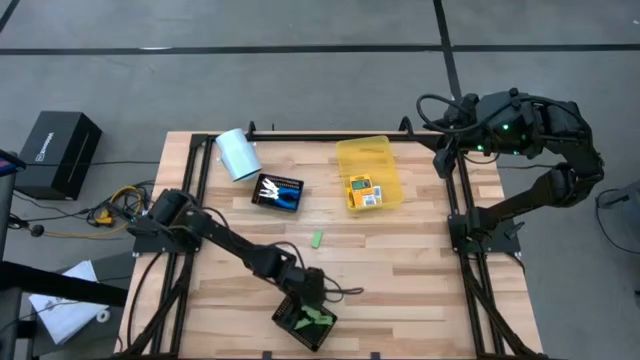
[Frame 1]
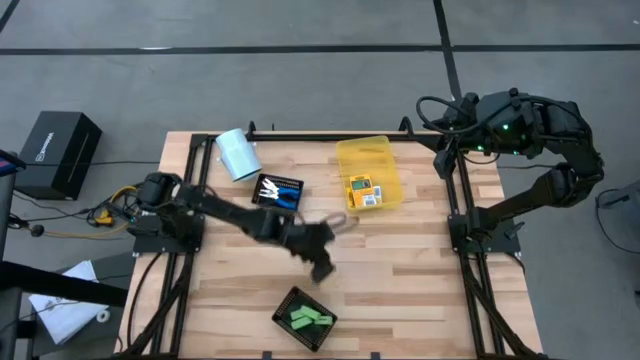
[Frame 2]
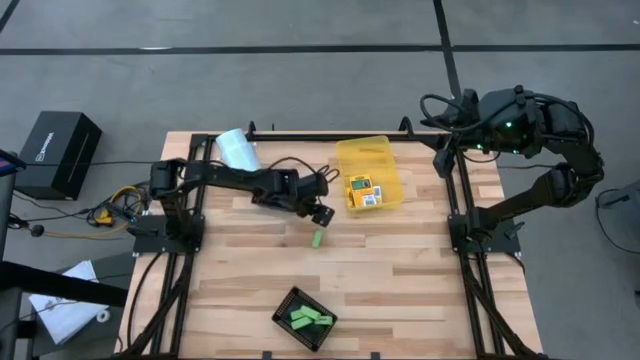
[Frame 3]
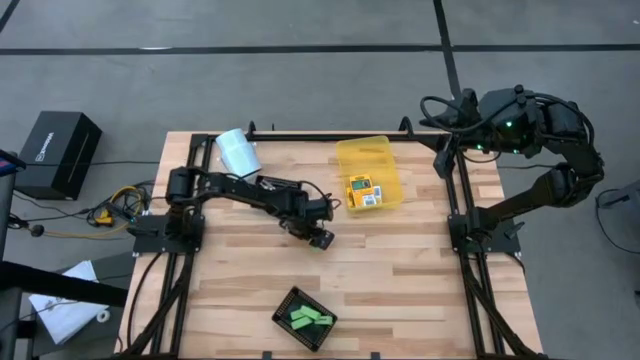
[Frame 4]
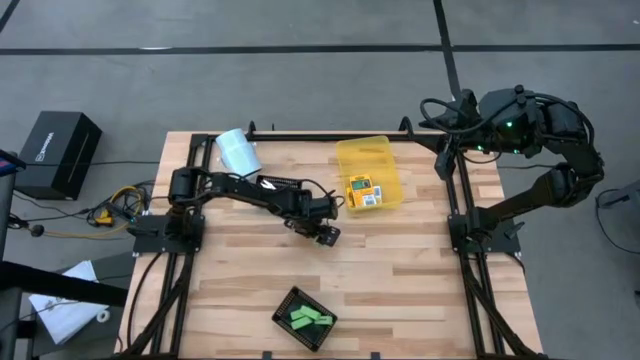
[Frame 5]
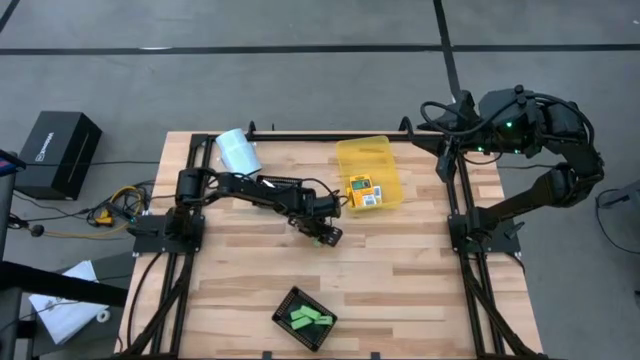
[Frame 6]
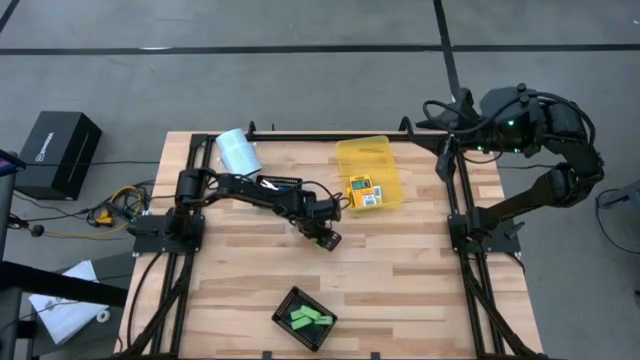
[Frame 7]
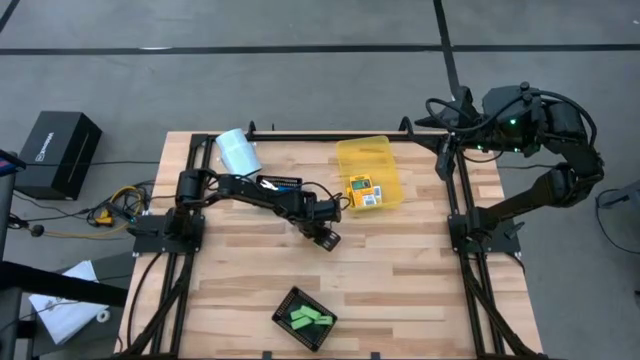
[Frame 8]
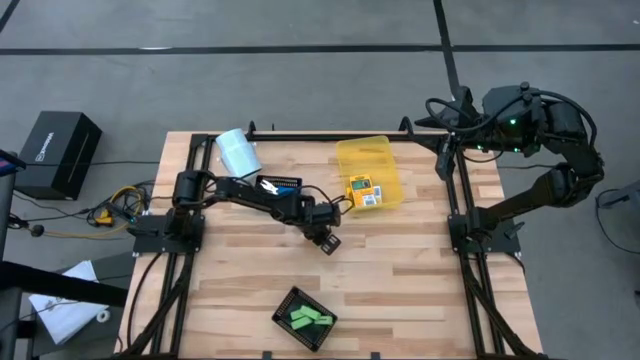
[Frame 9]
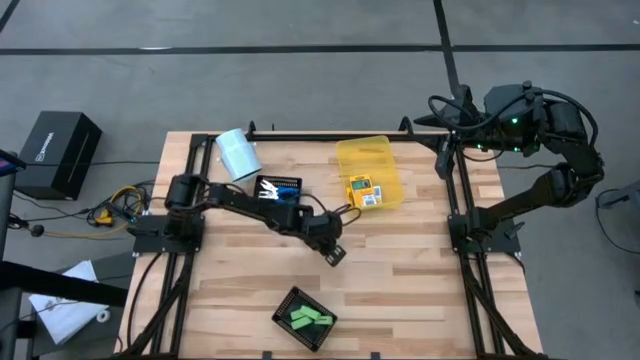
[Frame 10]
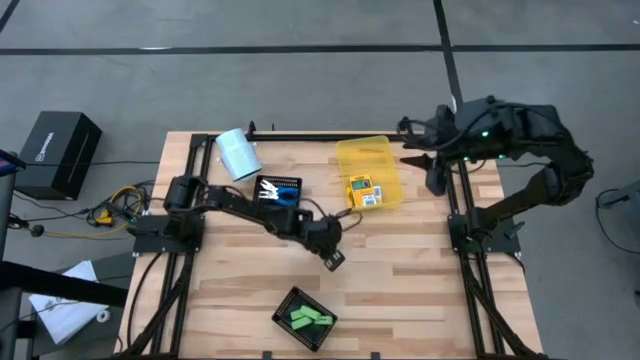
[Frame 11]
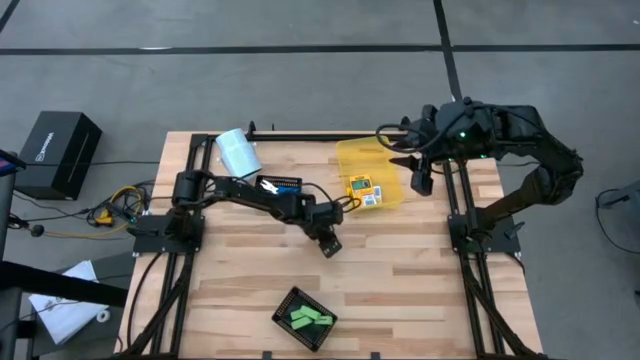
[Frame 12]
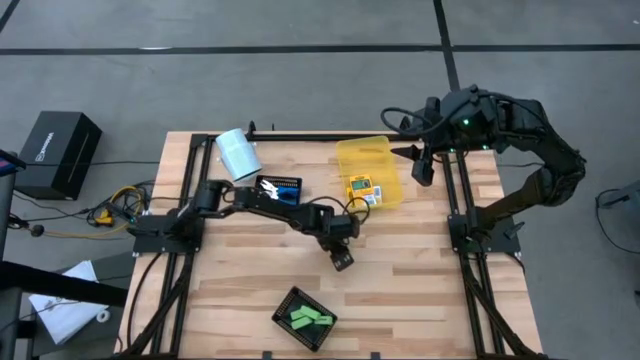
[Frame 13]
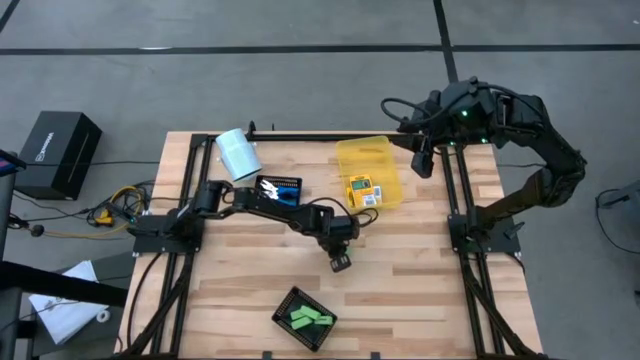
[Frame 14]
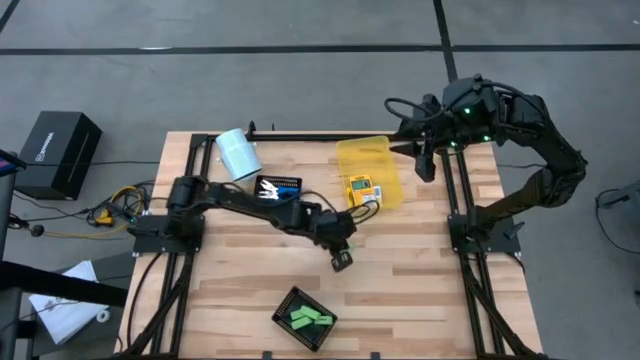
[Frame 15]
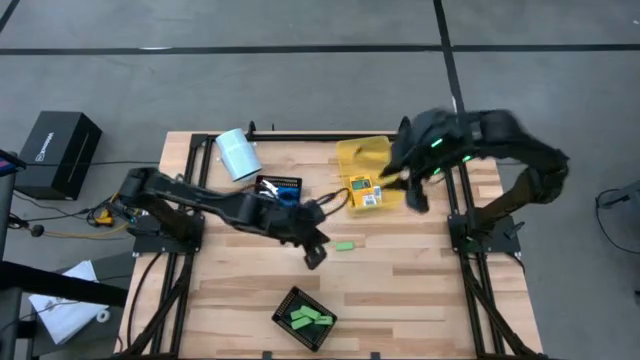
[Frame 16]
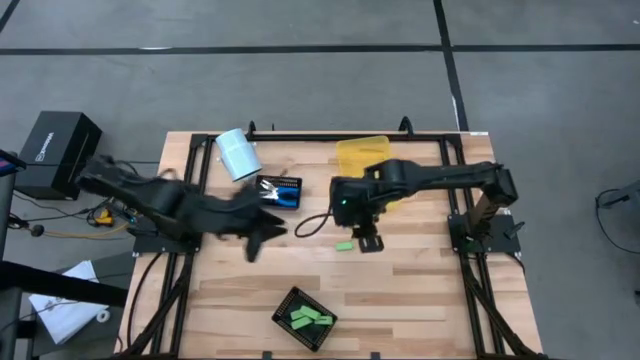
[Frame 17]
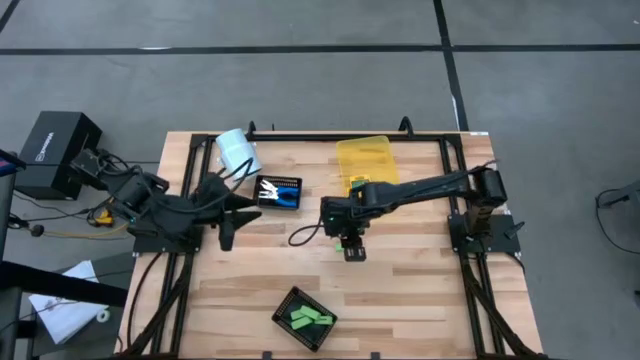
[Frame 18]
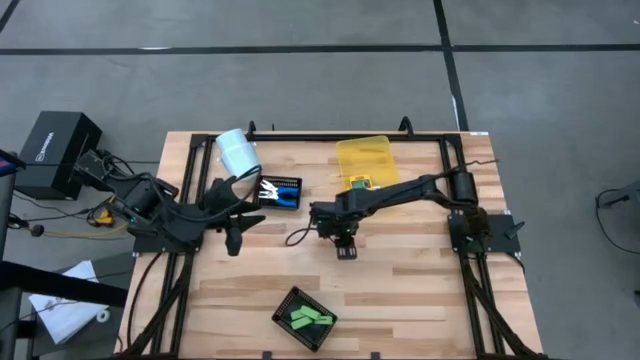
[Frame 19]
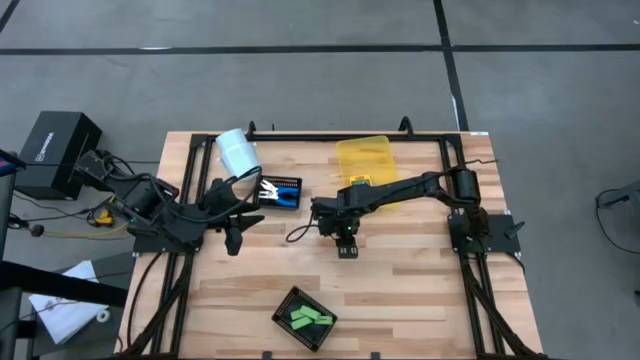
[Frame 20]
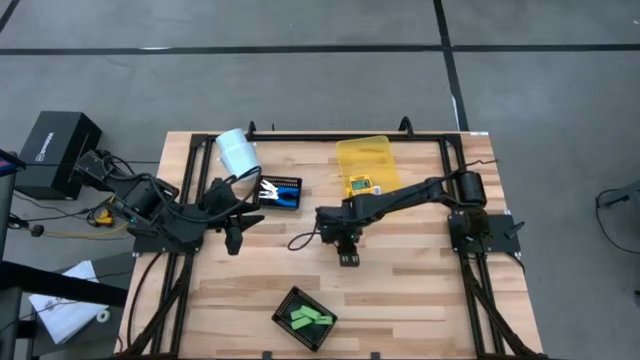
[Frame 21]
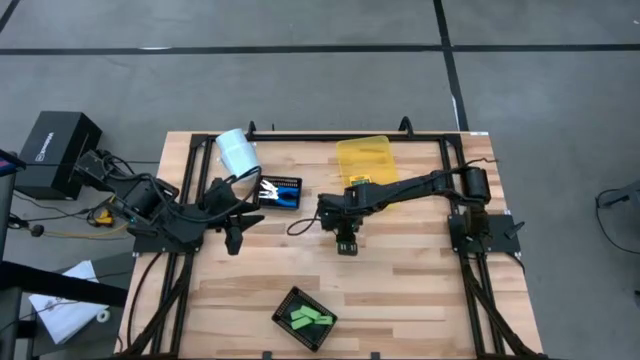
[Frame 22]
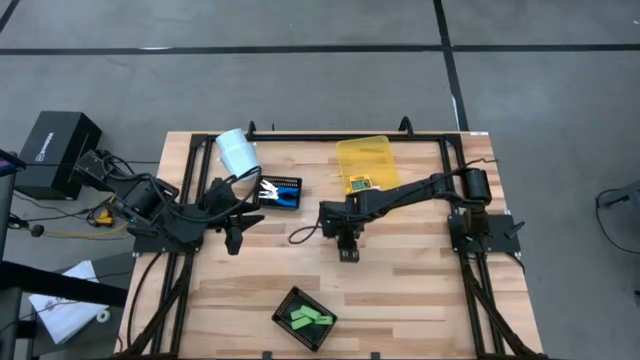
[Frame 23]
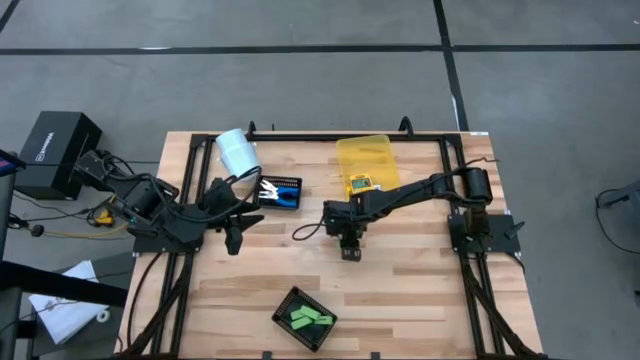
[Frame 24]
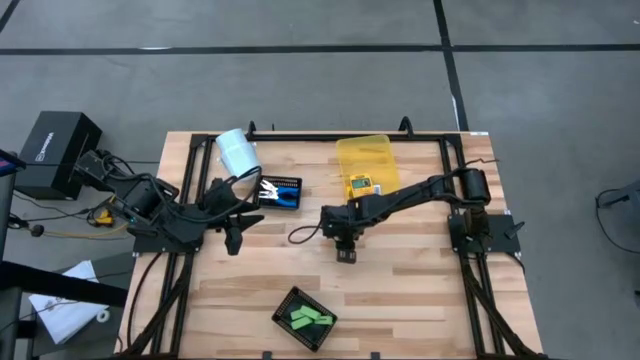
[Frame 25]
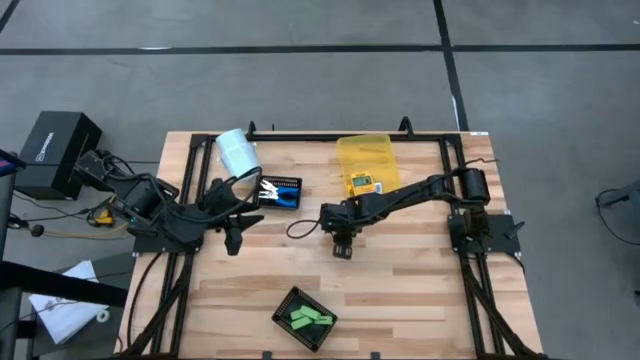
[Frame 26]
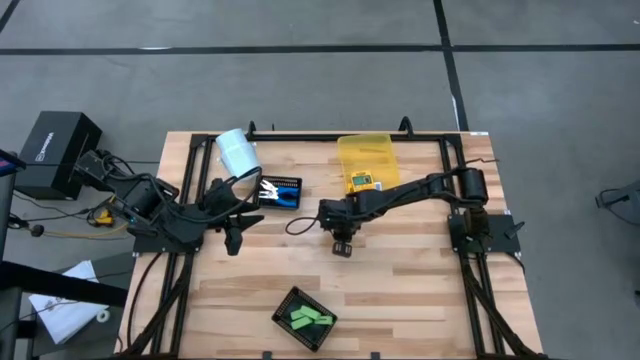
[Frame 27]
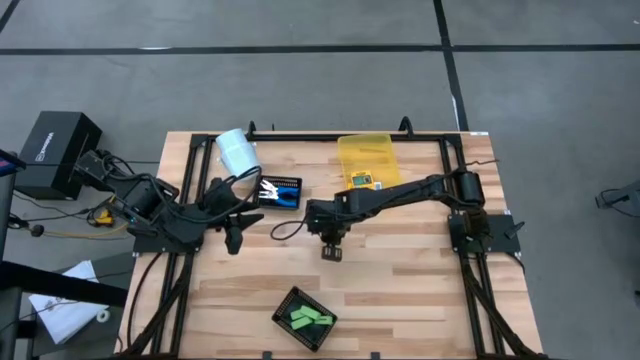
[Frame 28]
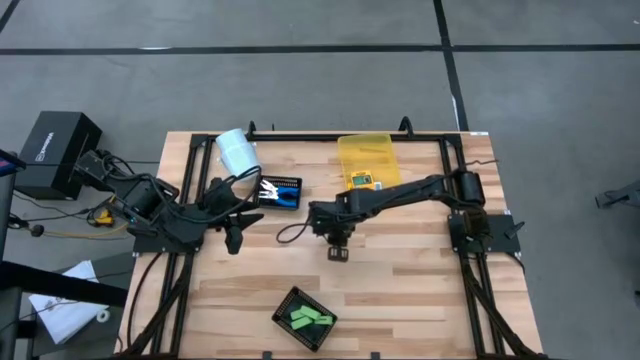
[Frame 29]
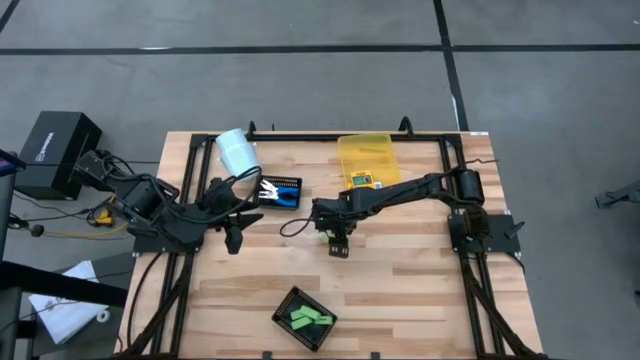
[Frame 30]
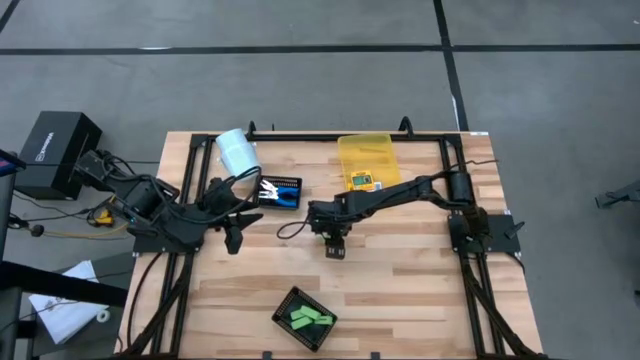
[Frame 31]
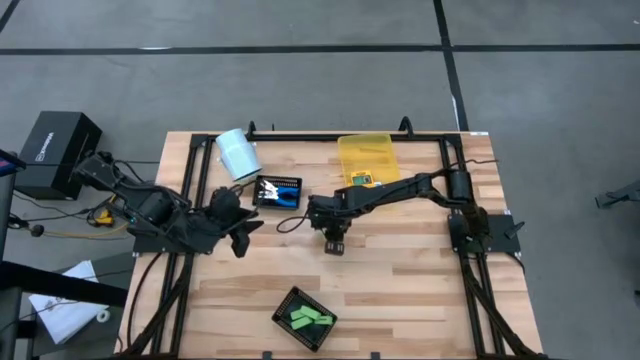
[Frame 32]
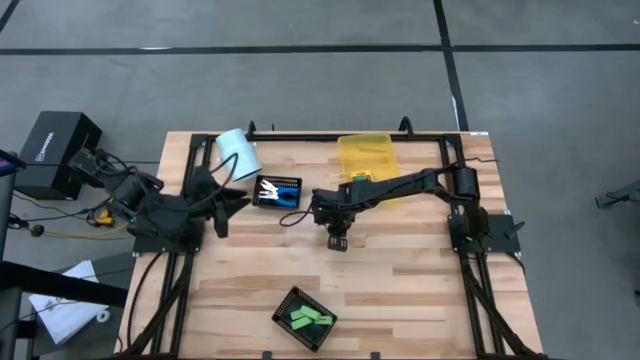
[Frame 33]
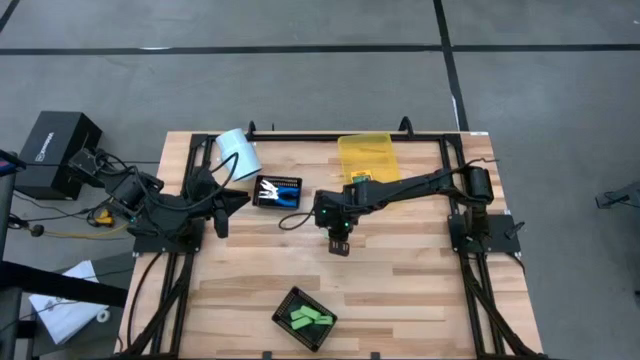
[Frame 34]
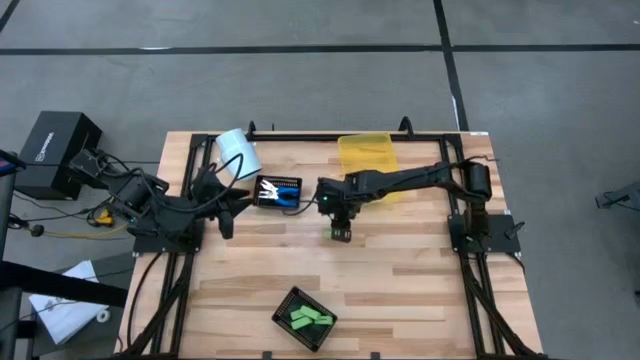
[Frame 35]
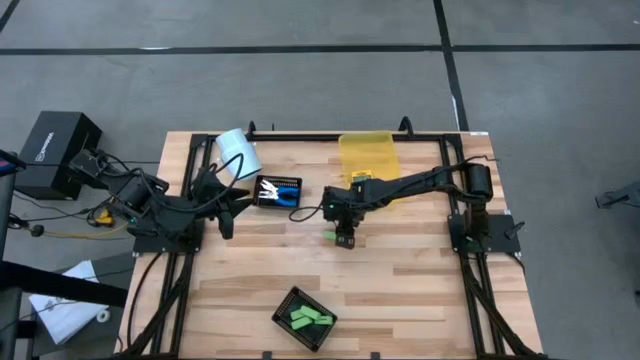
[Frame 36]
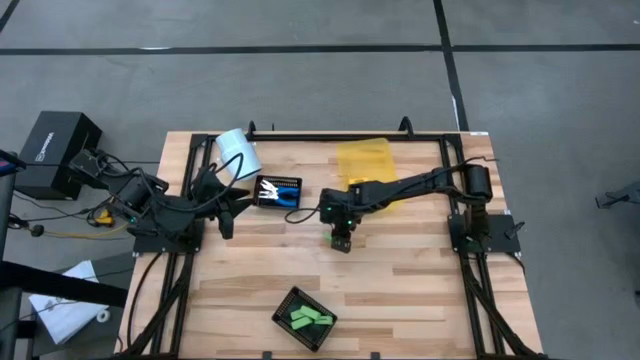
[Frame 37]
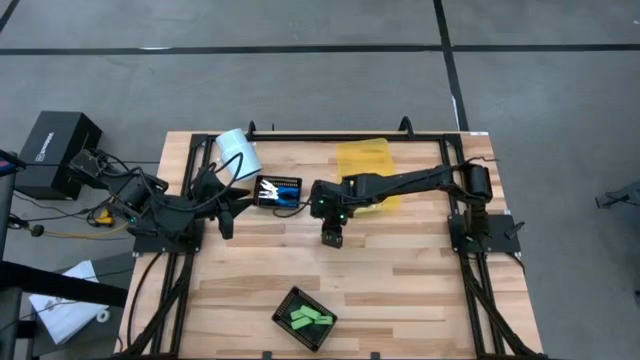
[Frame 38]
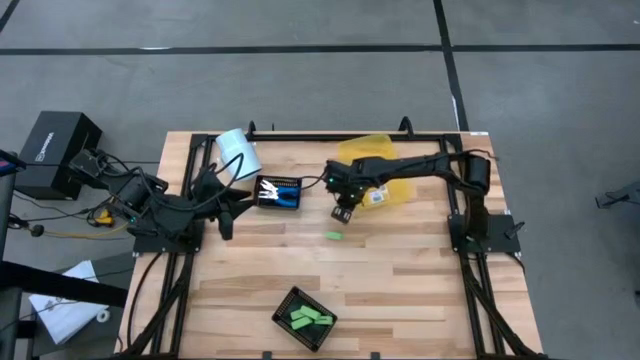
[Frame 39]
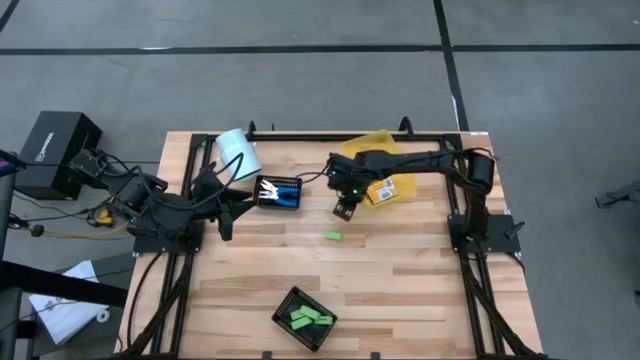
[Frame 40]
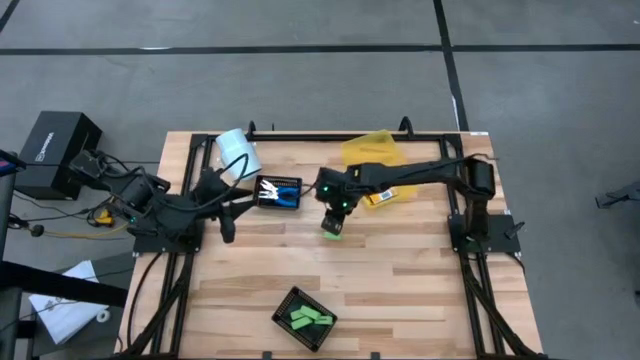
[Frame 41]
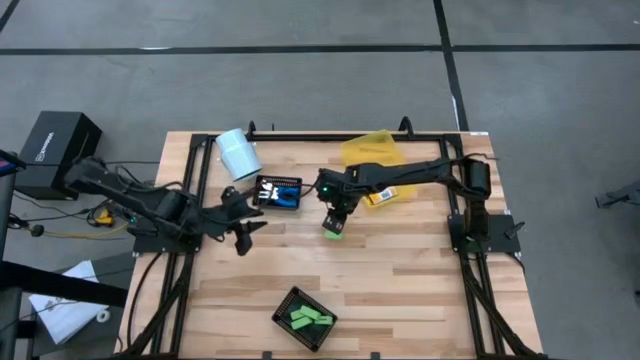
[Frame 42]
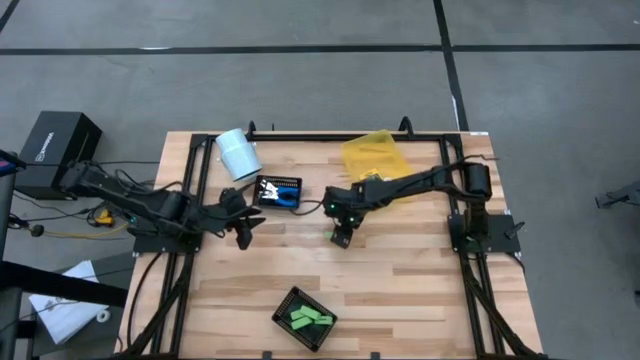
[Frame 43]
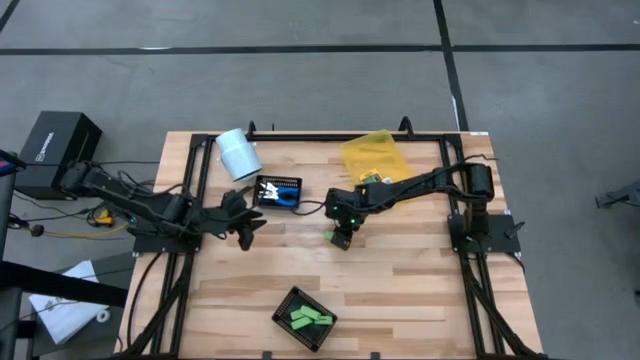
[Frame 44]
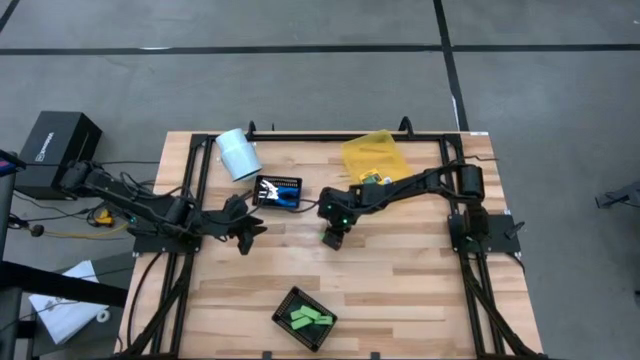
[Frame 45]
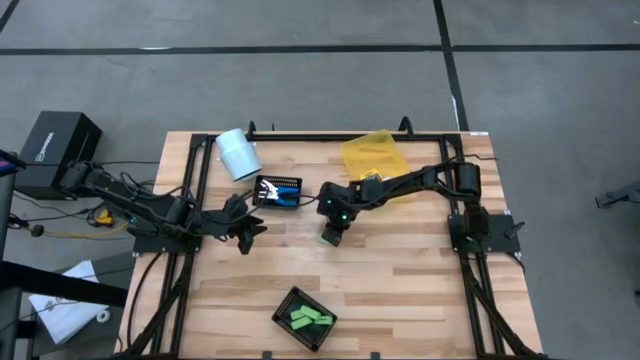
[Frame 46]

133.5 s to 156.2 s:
Task: Pick & Place School Supplies
Put the green eraser into the bottom black bin
